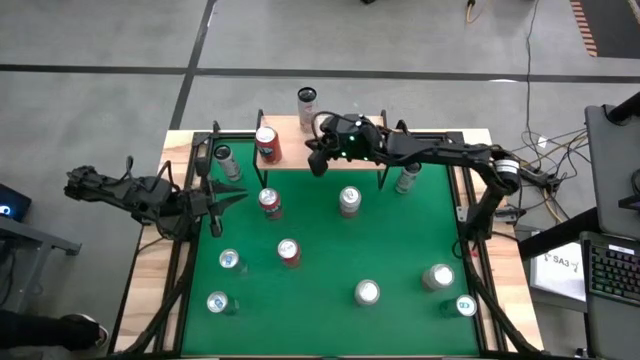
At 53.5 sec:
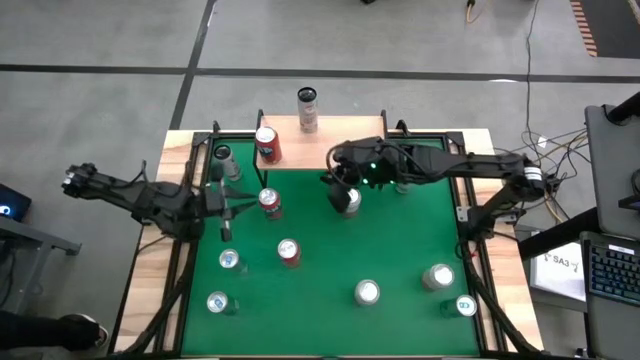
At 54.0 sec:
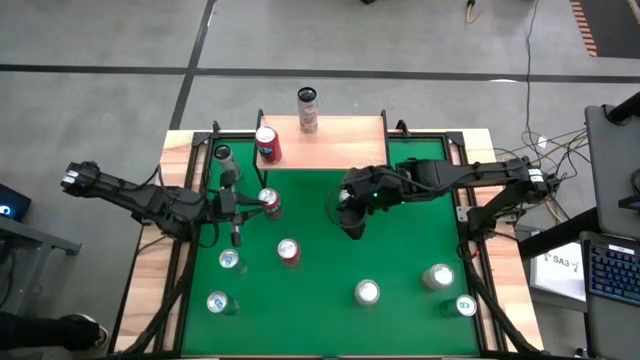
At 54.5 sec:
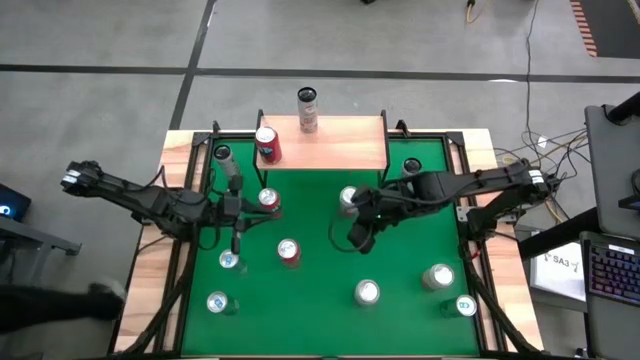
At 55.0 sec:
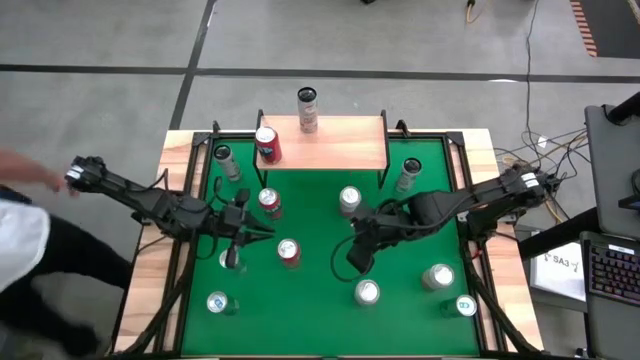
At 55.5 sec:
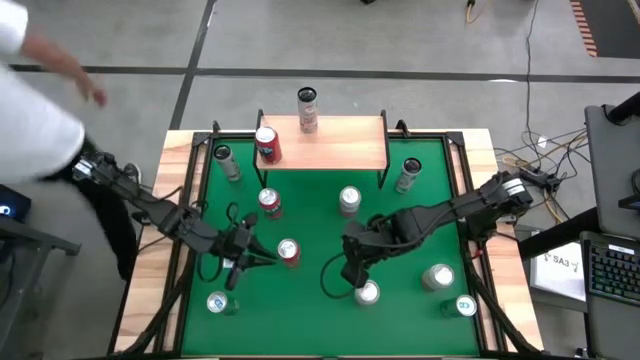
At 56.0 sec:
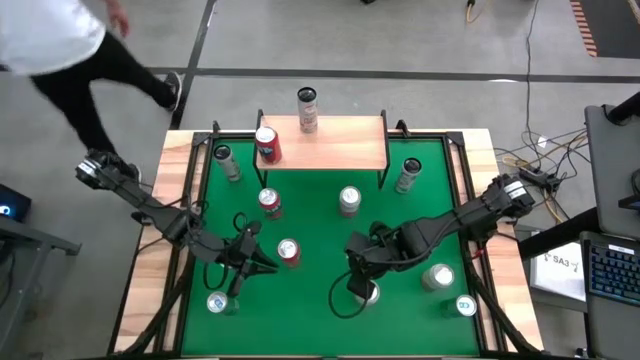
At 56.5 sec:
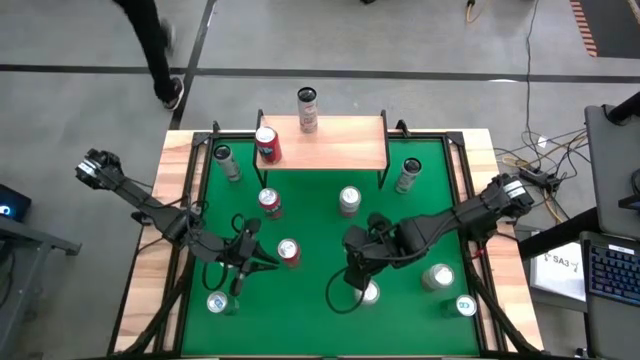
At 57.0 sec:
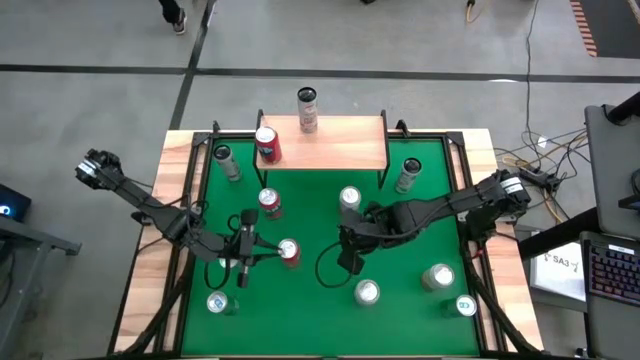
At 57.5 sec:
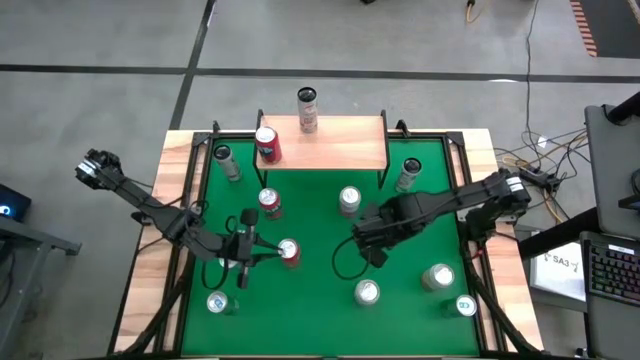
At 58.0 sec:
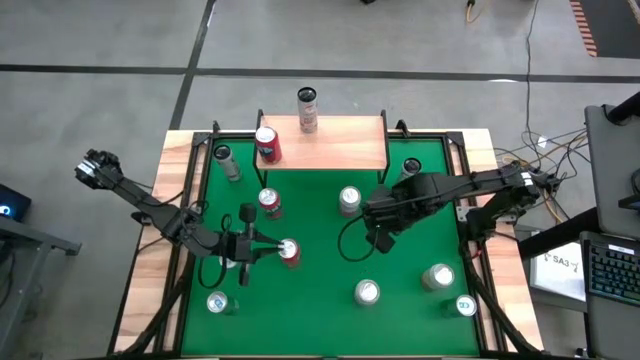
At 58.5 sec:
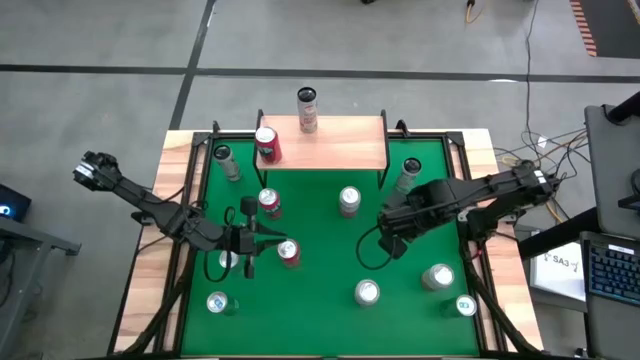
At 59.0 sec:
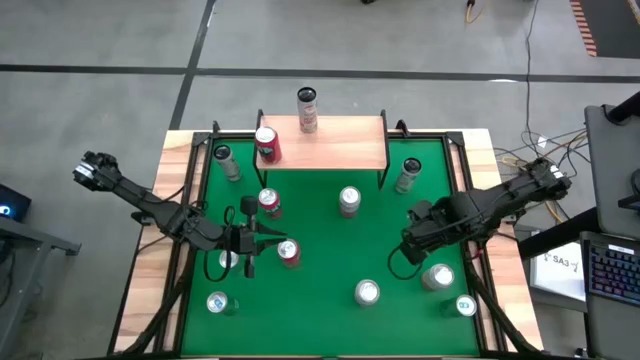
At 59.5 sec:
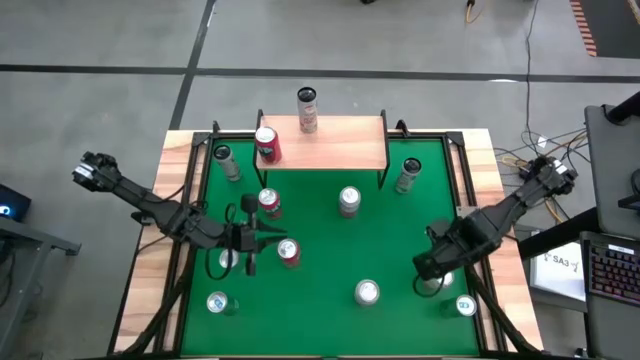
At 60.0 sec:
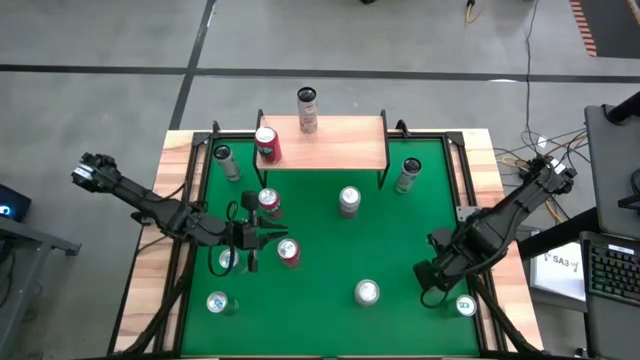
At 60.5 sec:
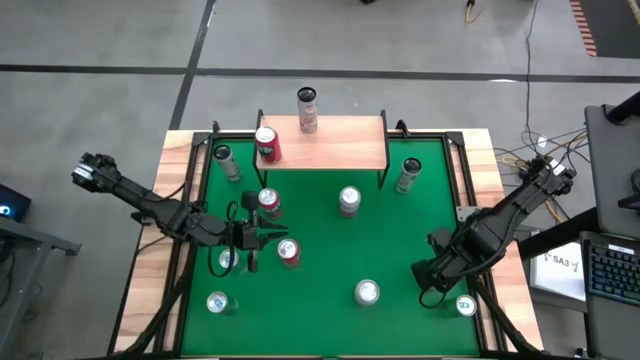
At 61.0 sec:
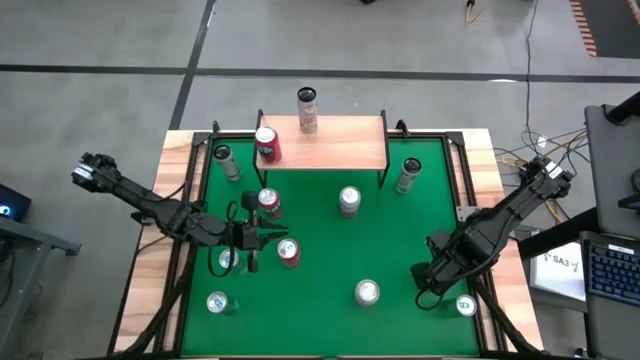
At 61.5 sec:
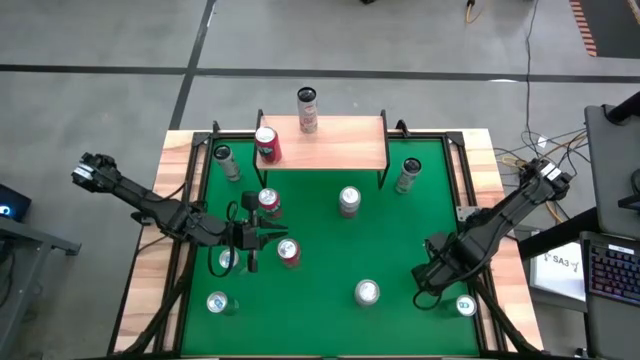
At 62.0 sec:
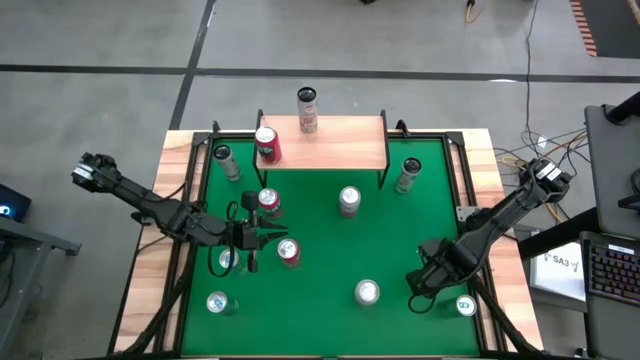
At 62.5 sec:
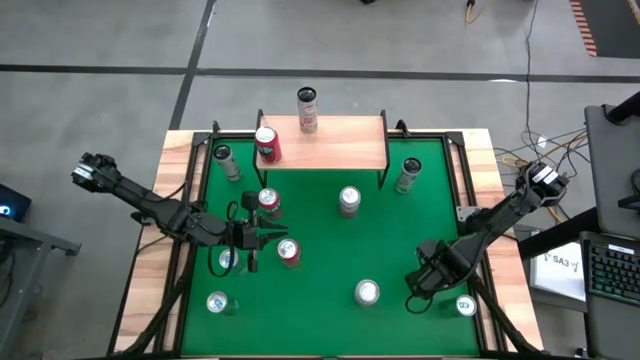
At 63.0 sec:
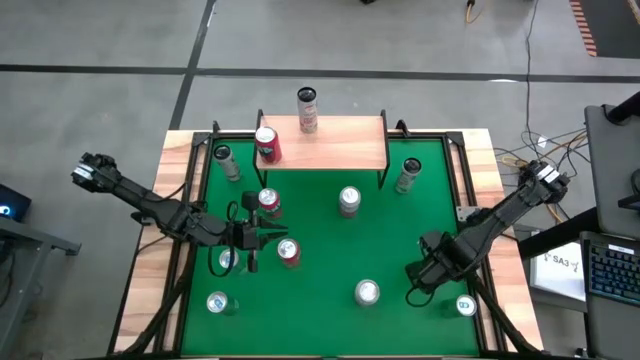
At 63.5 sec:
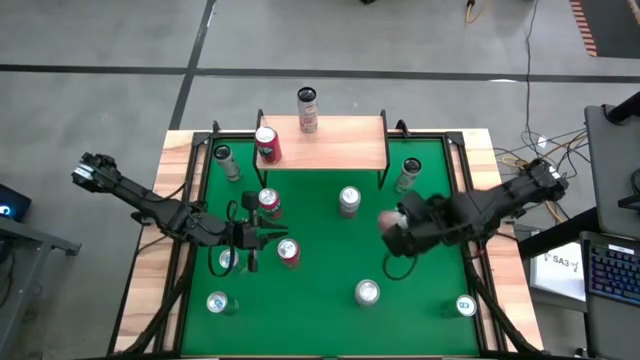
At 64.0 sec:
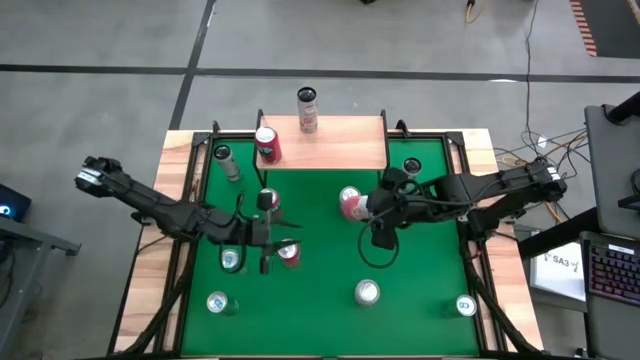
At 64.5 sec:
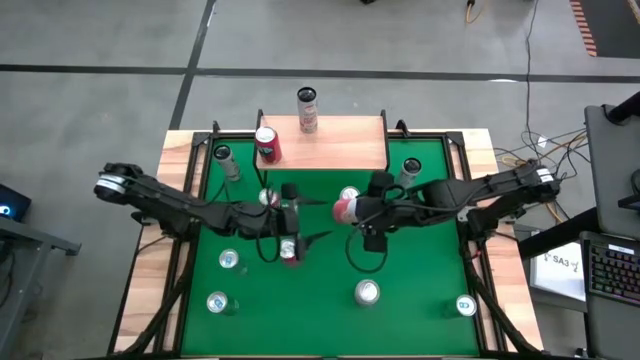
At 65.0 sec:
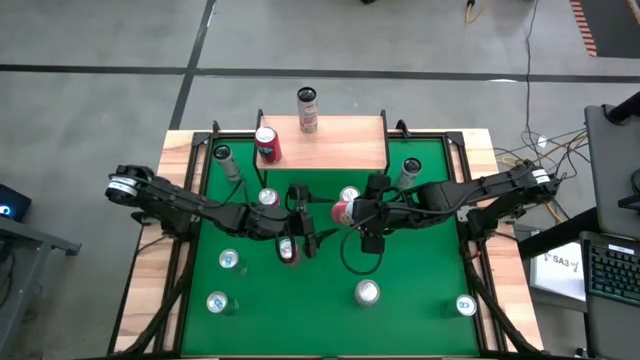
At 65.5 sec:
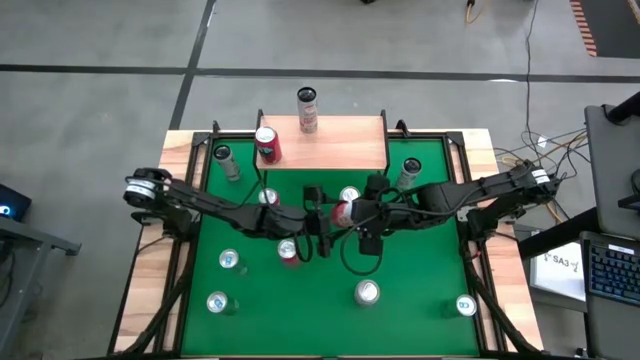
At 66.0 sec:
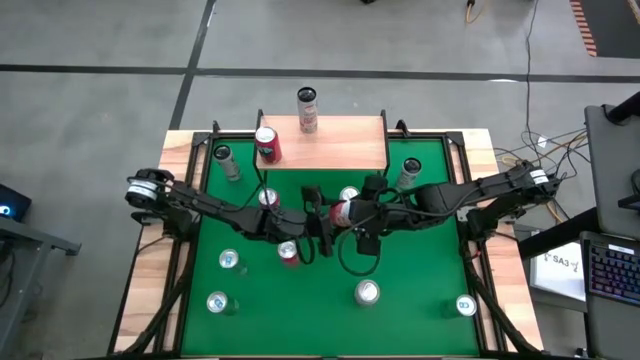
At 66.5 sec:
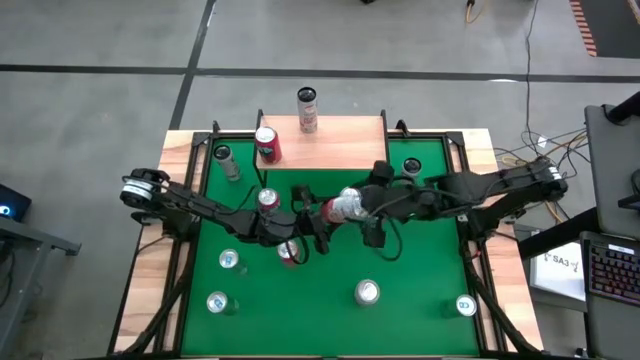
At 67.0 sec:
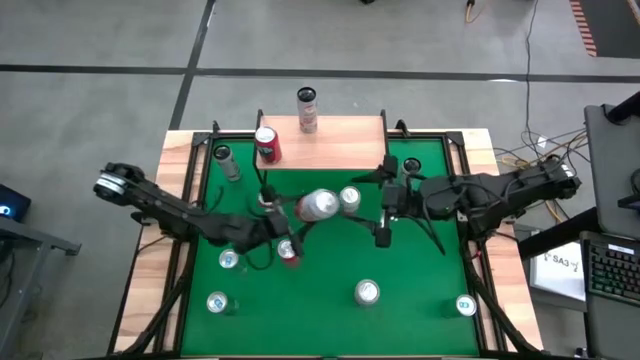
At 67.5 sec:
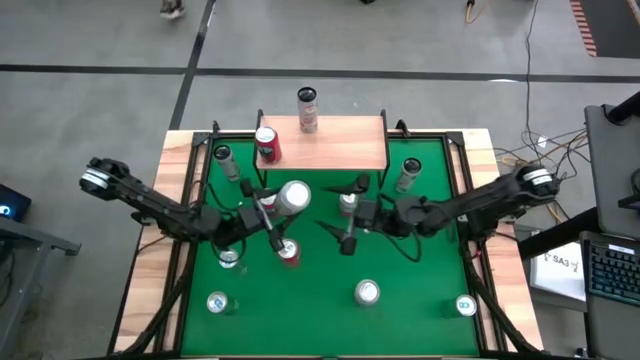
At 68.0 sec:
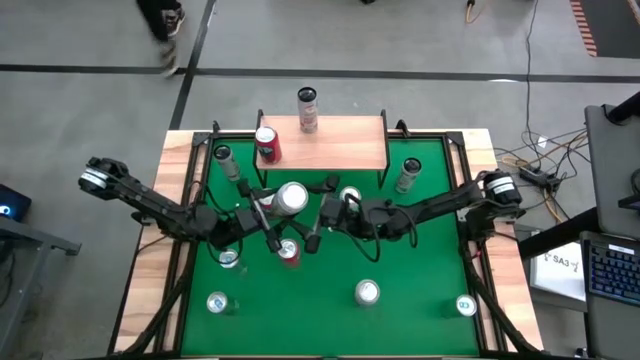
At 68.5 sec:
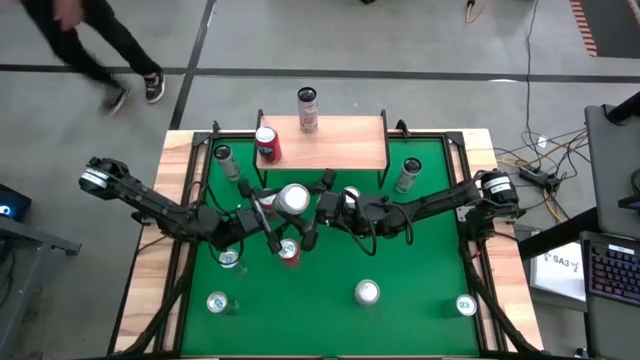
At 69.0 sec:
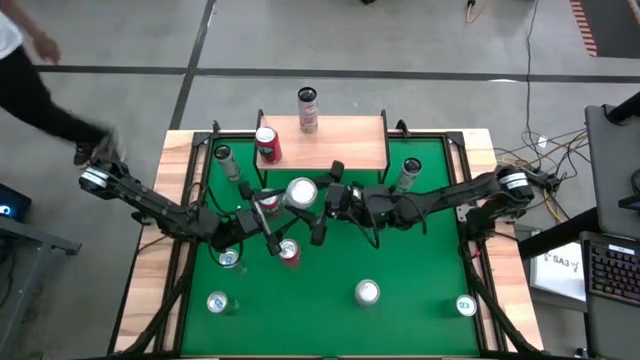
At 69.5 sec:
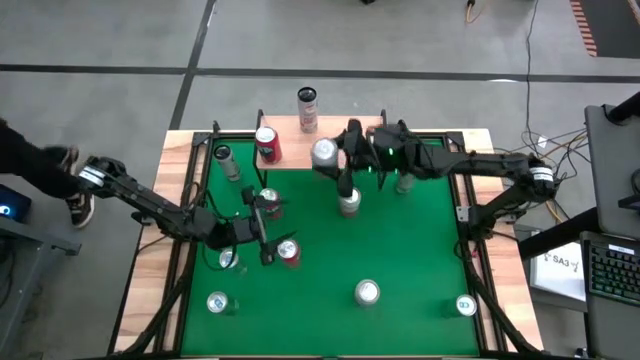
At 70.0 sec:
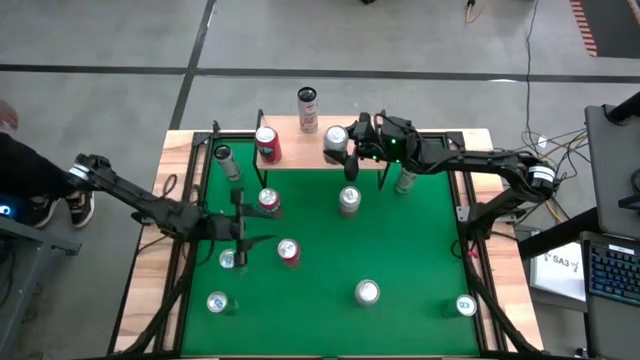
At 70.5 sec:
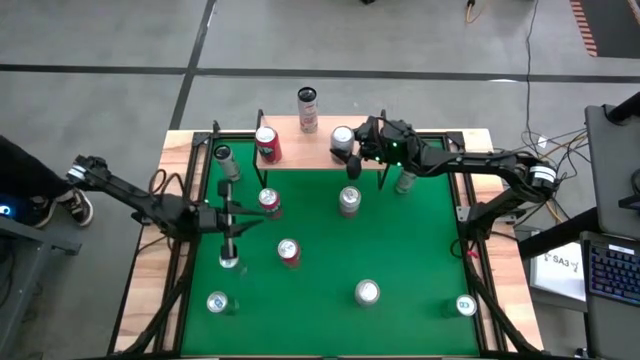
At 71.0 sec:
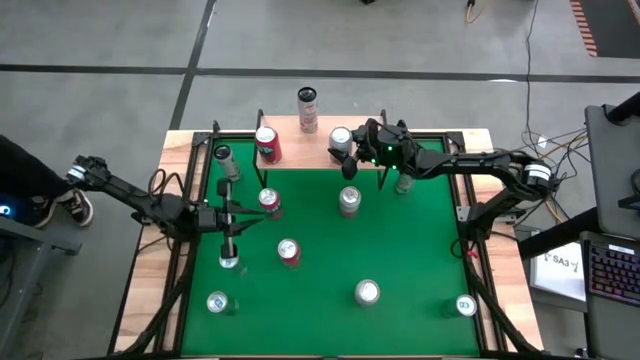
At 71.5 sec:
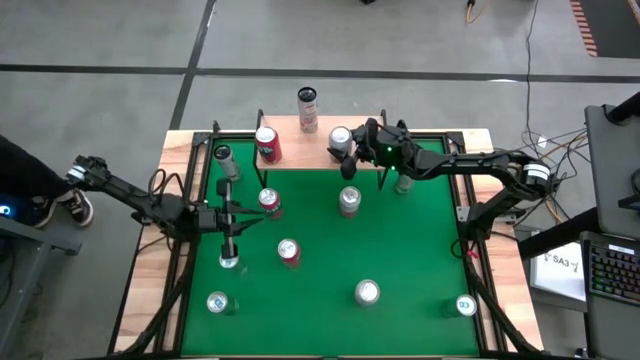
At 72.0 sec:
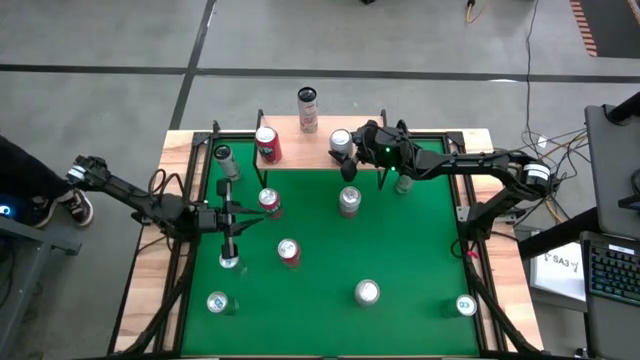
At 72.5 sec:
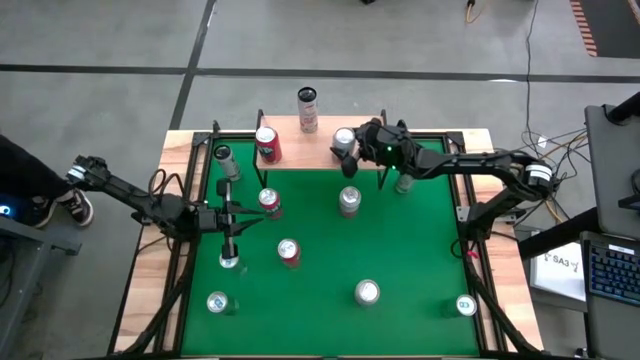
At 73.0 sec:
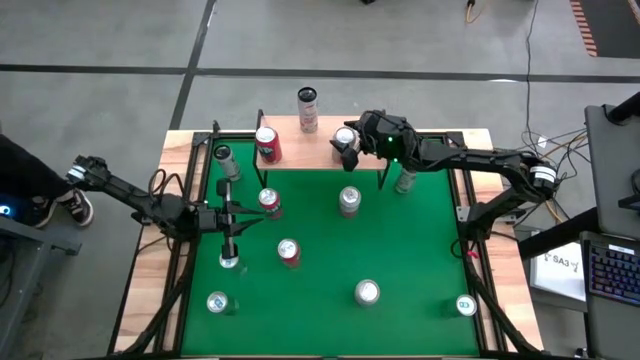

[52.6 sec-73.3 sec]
Task: Place canned beverage on shelf
Put the bottom right white orange soda can on the shelf

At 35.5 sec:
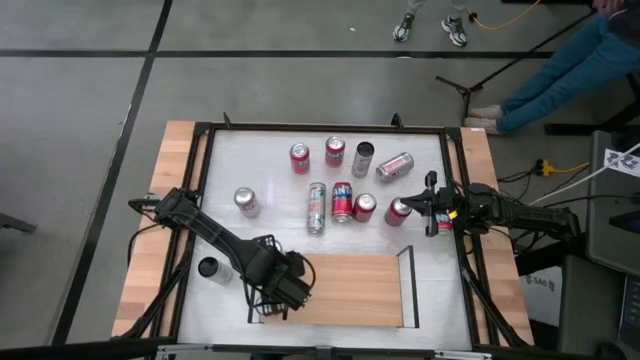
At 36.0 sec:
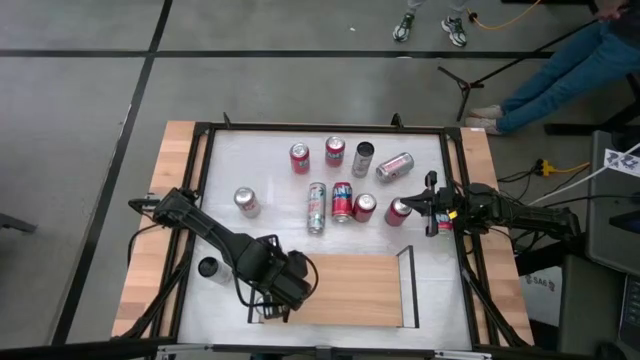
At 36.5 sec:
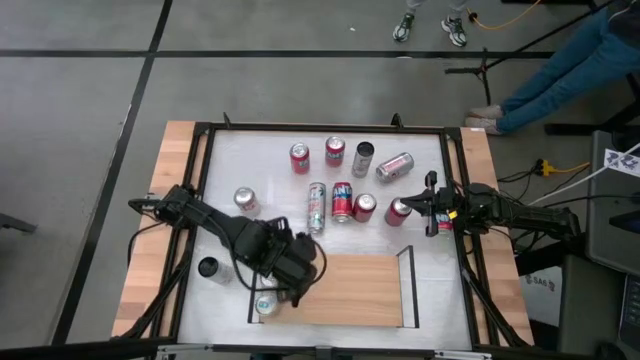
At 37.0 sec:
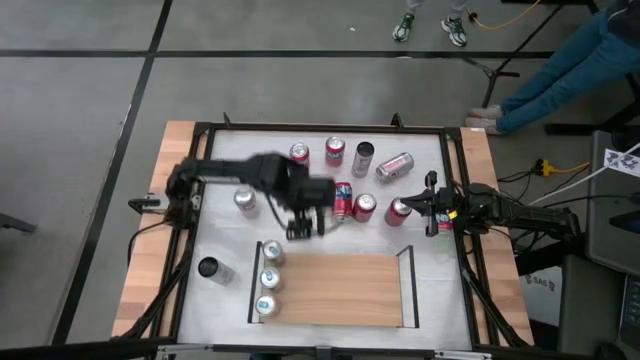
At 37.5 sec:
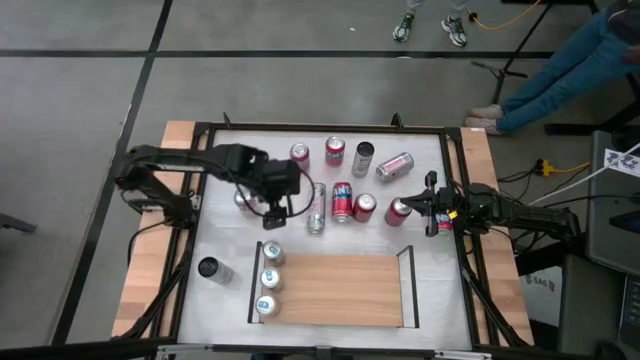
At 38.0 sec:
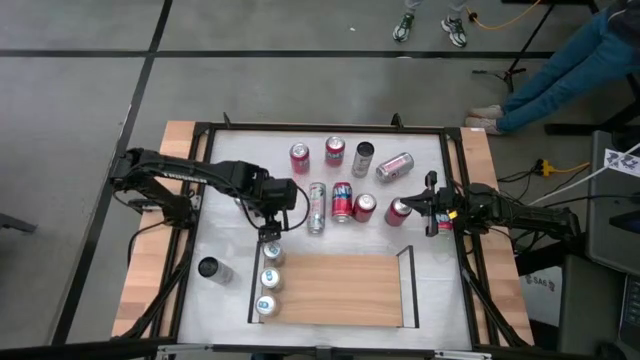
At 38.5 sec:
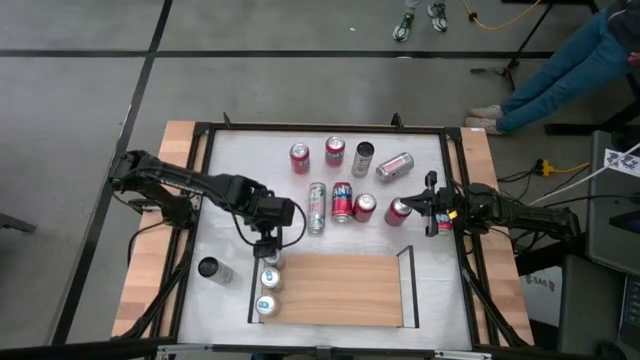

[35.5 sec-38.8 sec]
Task: Place canned beverage on shelf
Adjust the blue soda can on the shelf
